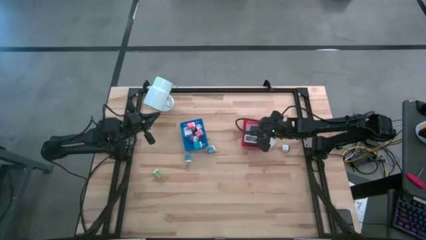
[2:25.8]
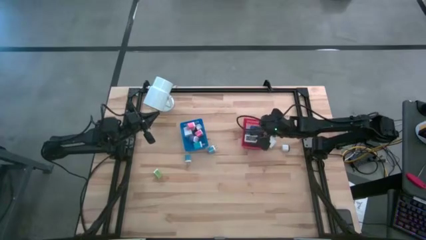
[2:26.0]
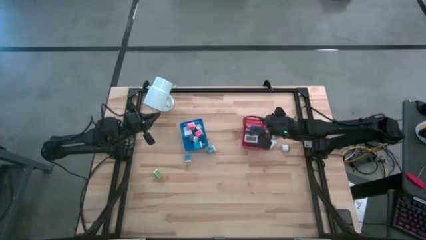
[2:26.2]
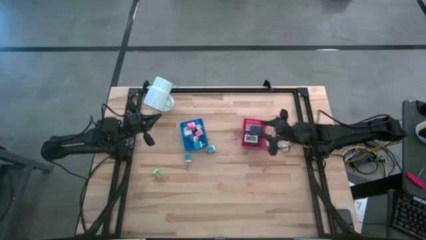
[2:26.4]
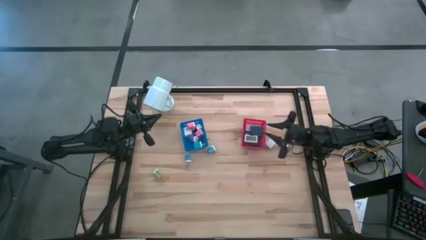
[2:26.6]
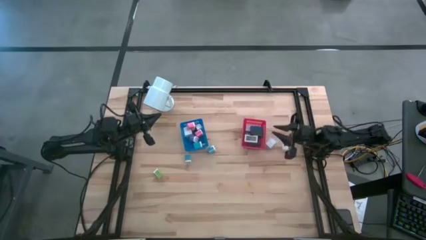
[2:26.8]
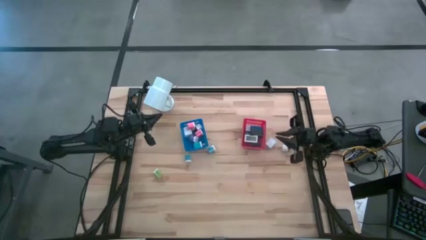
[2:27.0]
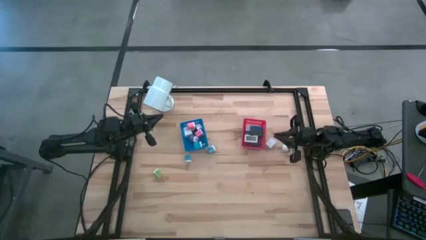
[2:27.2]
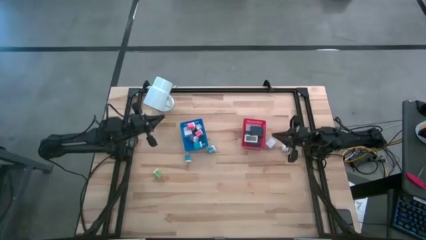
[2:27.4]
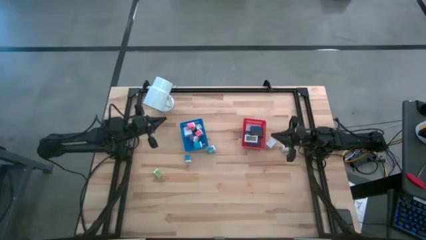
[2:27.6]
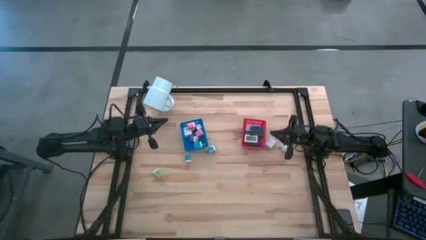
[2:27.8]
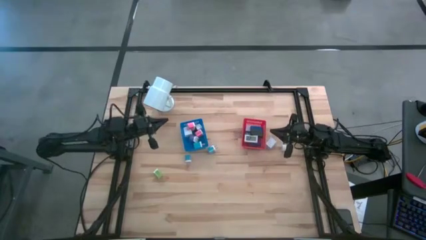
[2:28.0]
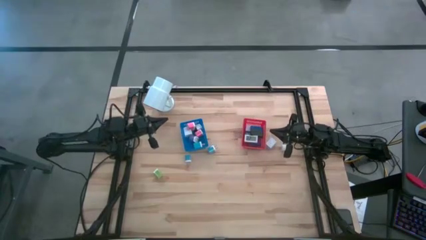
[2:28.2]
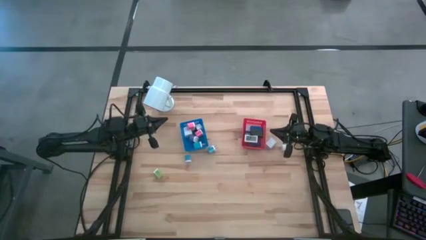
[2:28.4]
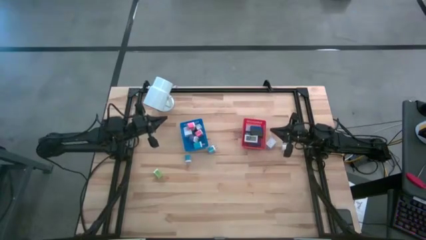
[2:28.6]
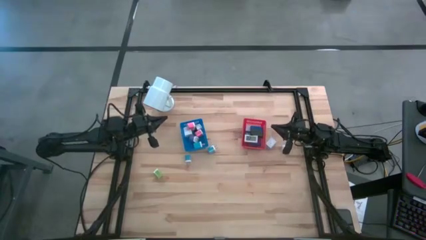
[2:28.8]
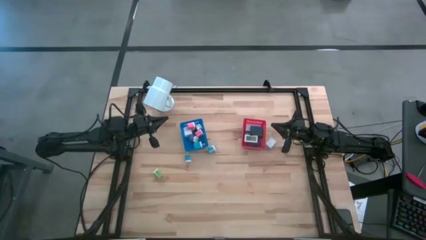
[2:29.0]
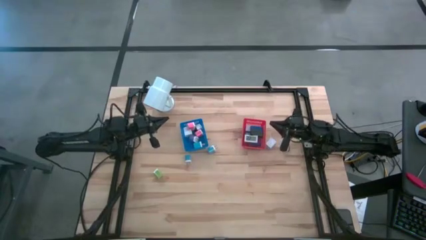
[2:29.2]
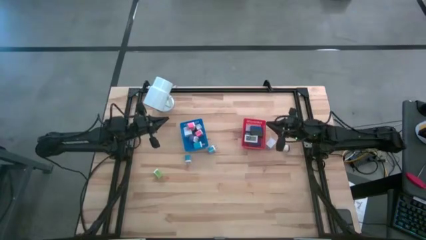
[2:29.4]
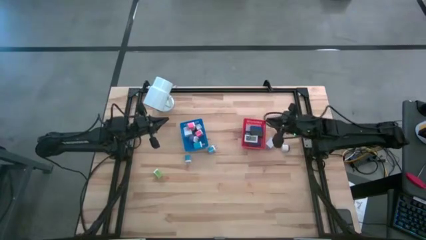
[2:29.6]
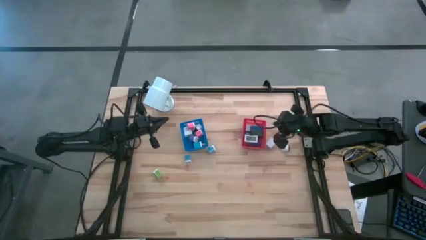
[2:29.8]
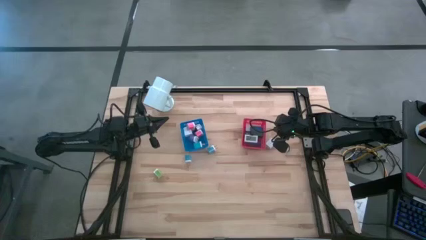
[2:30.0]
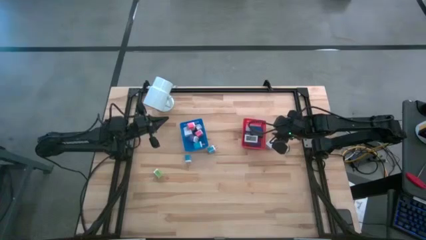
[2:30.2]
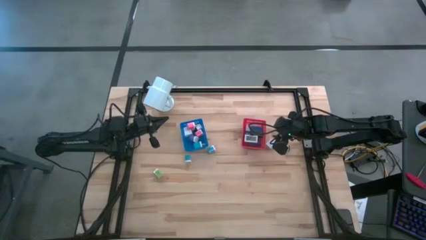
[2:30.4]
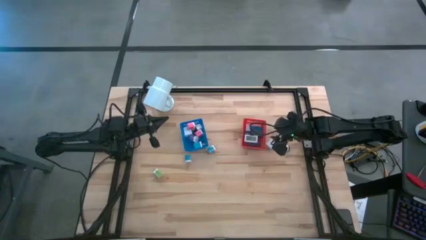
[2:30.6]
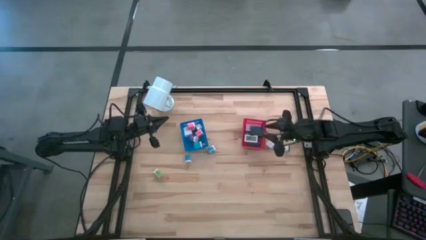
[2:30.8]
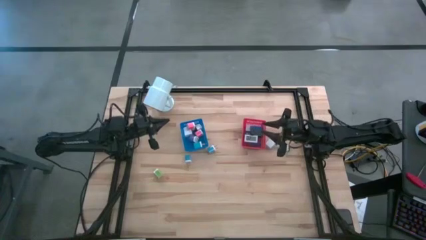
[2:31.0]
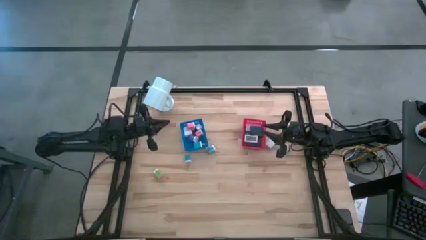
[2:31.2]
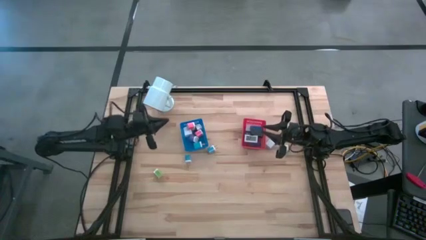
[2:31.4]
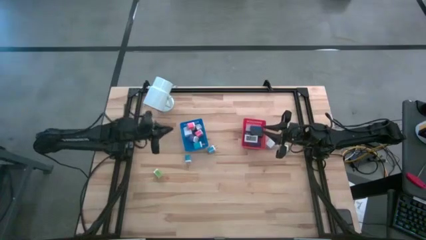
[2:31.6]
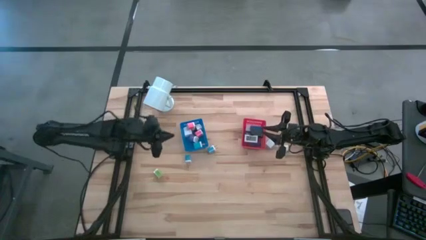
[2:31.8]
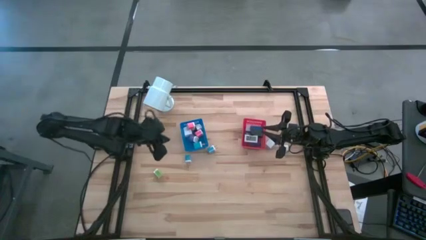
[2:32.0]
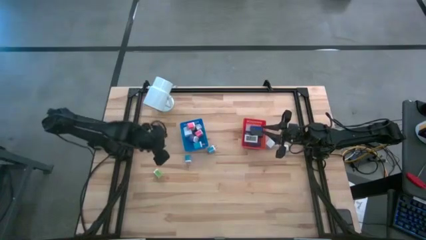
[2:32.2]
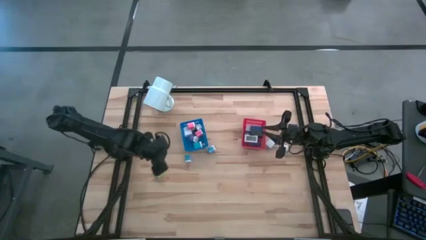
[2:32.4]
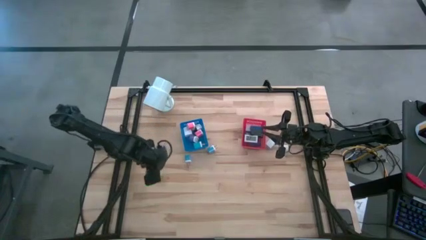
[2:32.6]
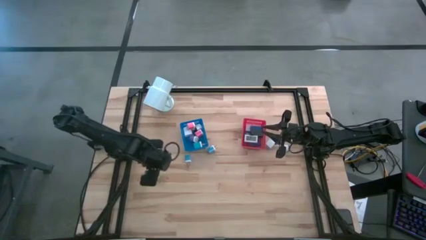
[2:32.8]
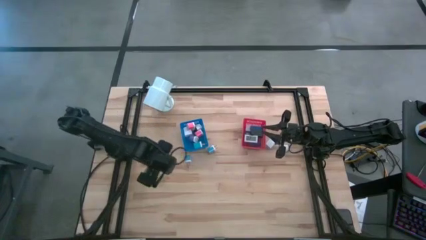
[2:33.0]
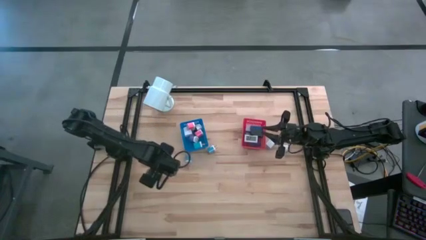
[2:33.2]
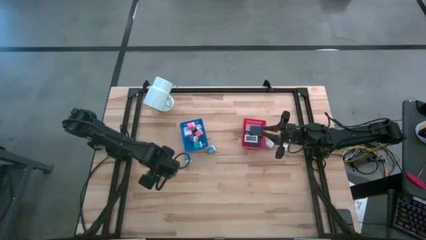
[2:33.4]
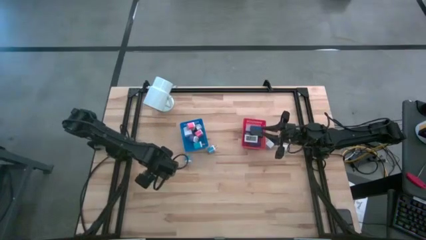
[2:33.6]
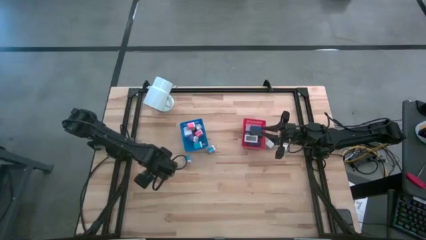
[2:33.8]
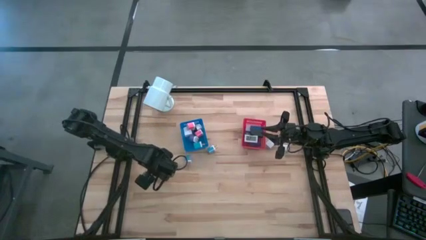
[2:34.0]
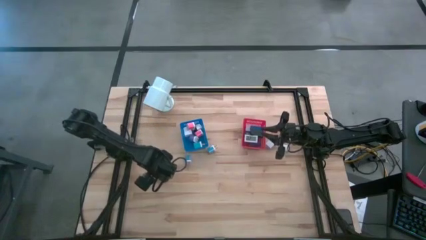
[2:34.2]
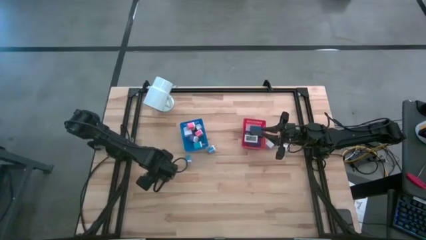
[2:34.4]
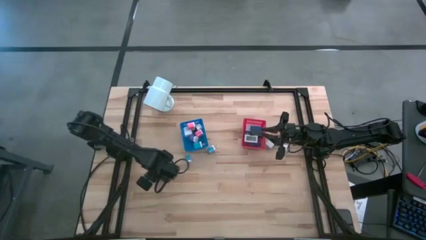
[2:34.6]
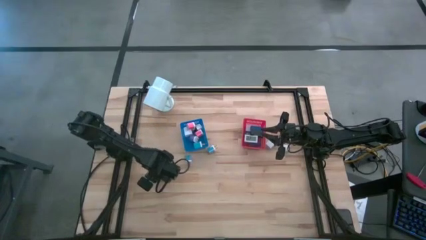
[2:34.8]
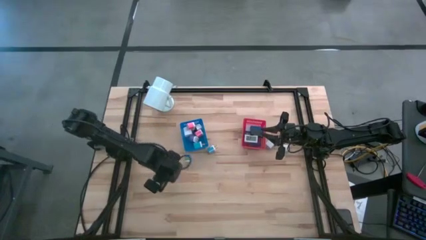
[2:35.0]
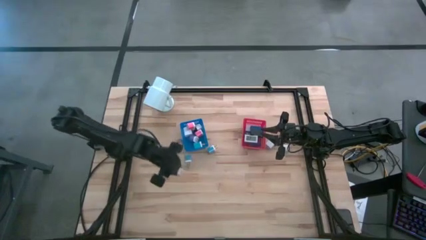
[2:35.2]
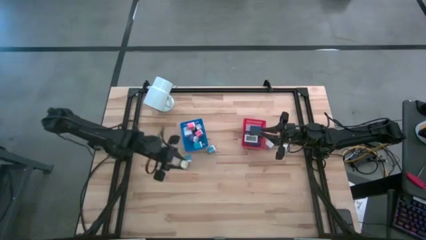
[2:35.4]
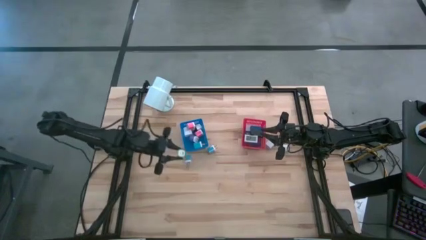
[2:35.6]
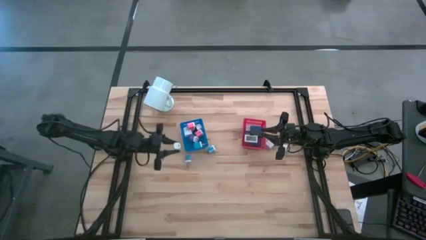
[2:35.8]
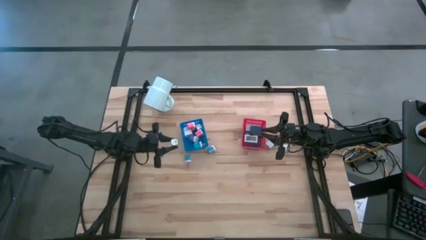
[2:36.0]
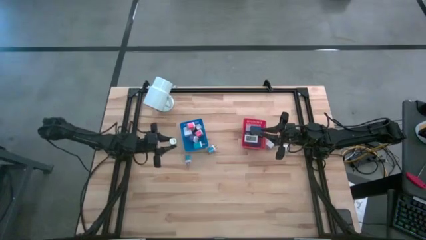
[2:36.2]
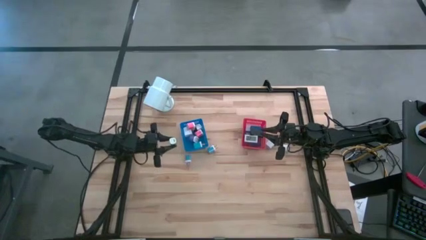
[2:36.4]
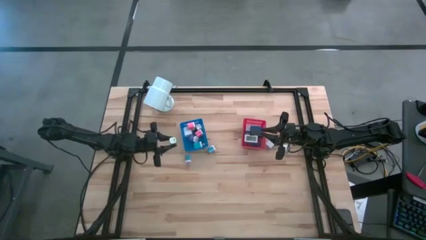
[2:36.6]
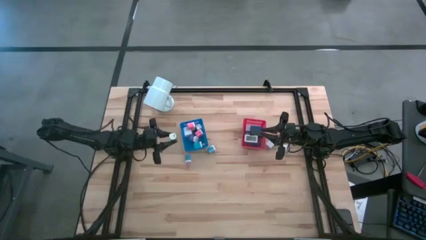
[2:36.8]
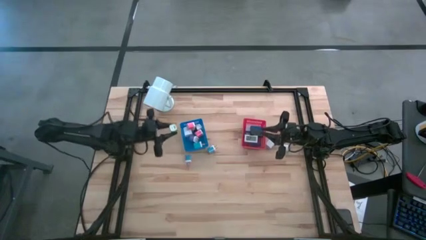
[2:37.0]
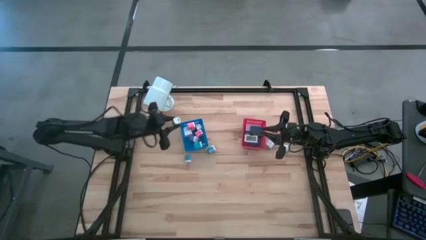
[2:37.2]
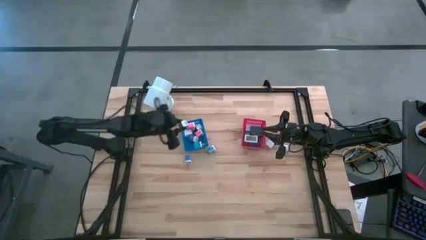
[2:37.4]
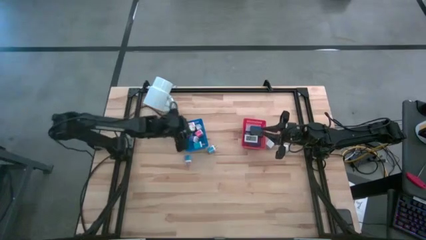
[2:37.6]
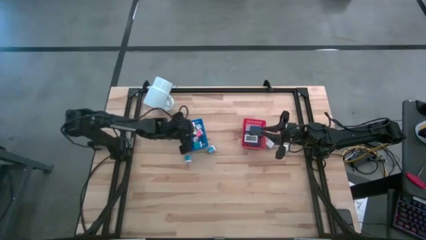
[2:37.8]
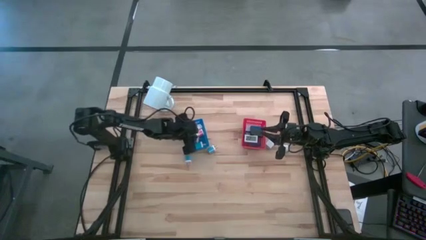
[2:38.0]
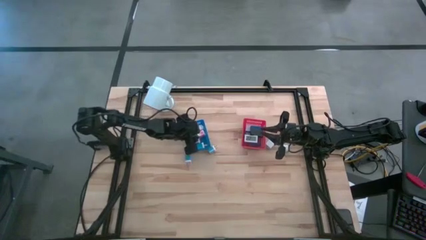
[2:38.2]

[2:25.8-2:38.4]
Task: Pick & Place Office items
Put the green charger adapter into the blue bin
